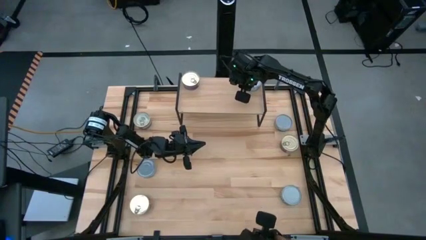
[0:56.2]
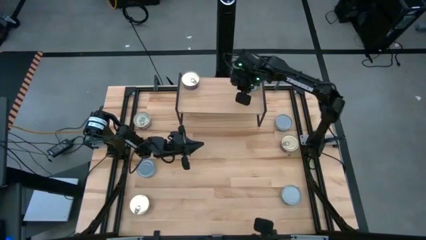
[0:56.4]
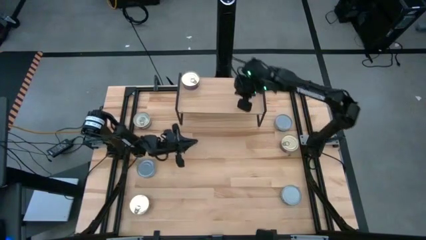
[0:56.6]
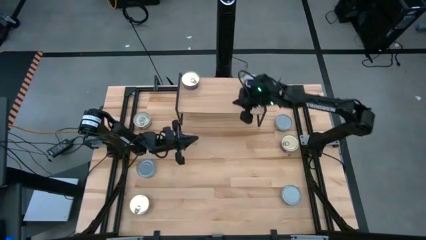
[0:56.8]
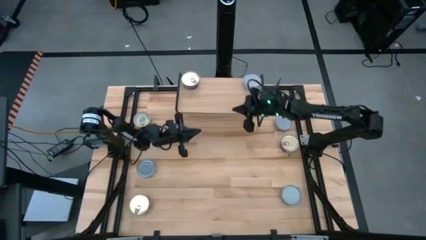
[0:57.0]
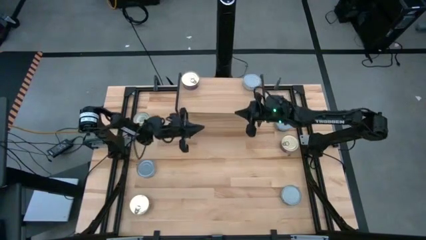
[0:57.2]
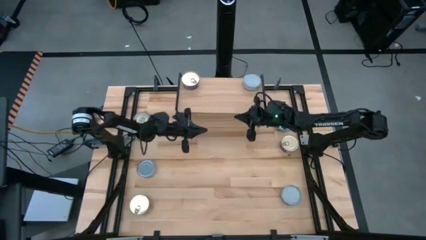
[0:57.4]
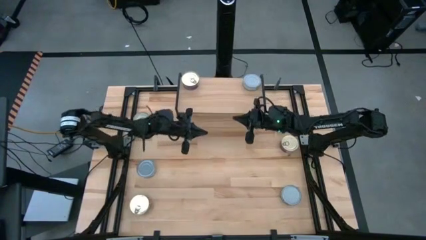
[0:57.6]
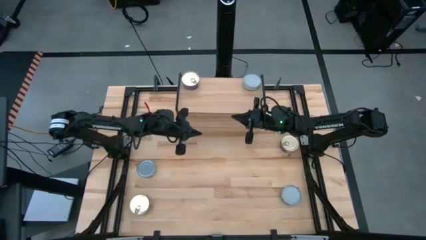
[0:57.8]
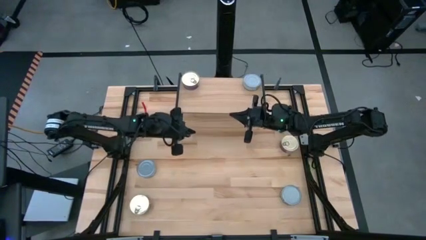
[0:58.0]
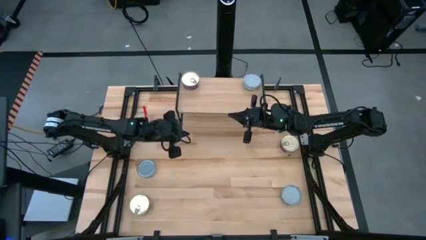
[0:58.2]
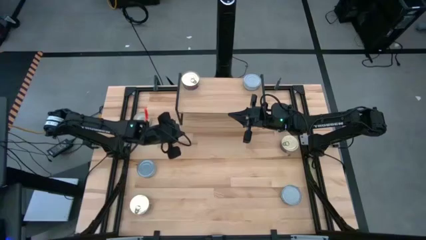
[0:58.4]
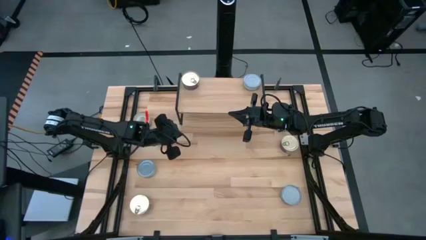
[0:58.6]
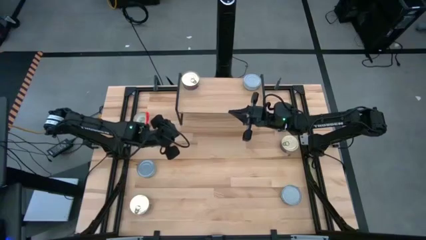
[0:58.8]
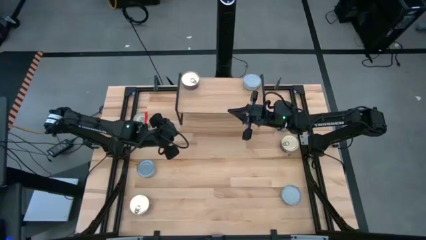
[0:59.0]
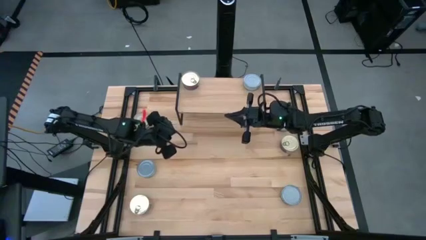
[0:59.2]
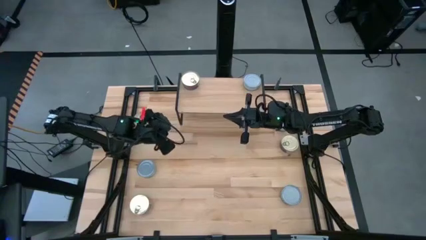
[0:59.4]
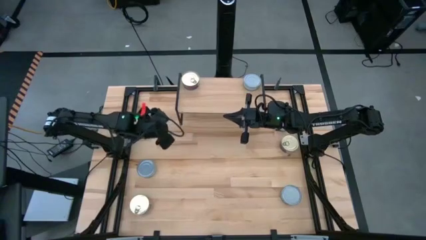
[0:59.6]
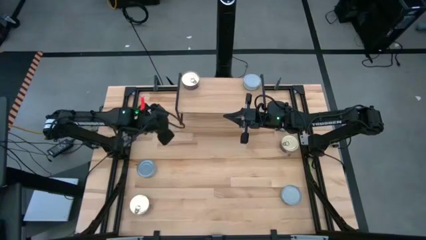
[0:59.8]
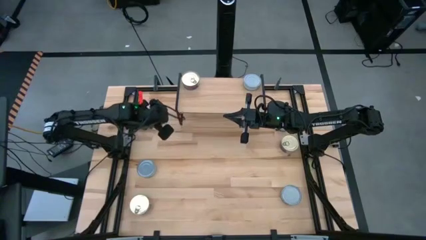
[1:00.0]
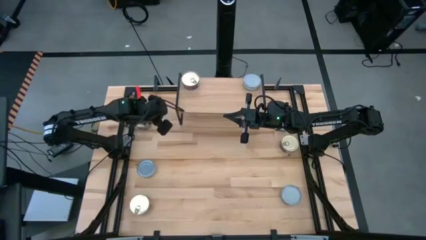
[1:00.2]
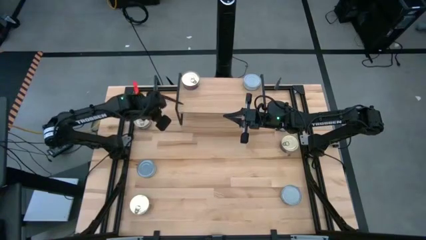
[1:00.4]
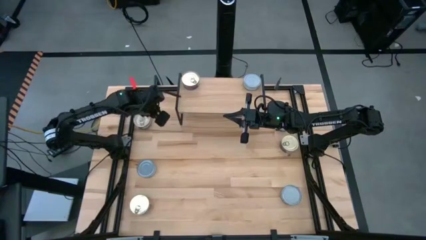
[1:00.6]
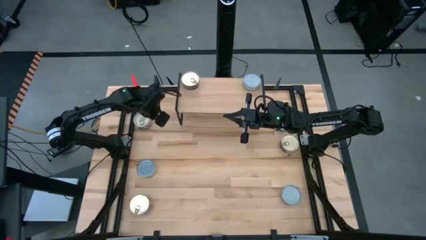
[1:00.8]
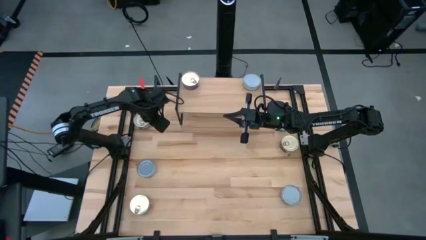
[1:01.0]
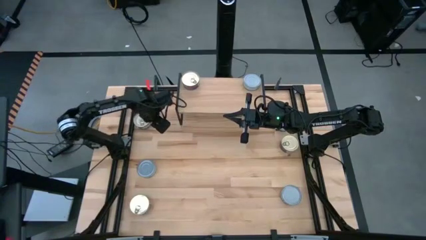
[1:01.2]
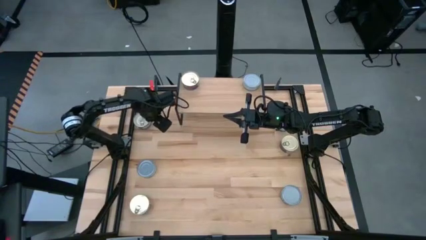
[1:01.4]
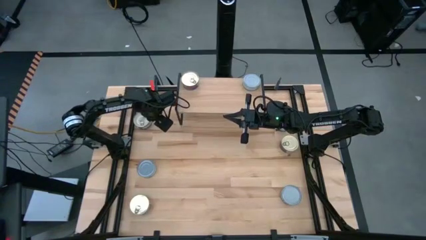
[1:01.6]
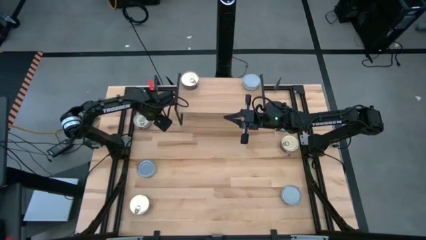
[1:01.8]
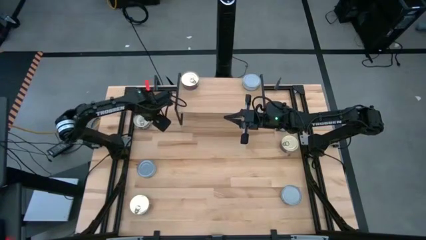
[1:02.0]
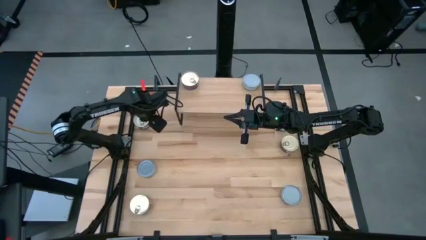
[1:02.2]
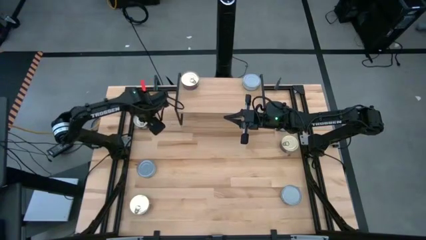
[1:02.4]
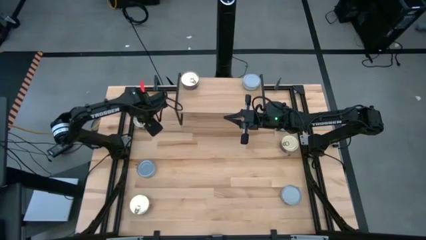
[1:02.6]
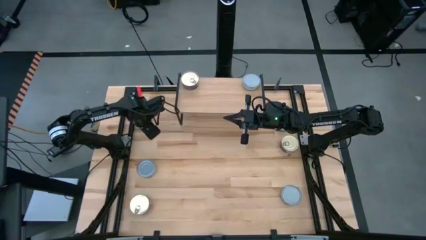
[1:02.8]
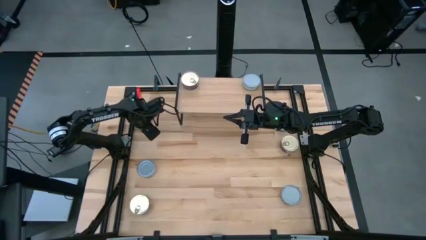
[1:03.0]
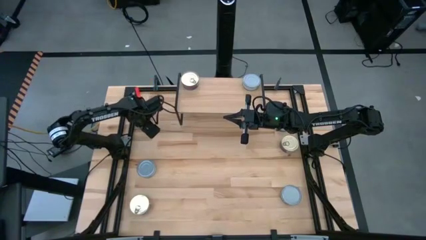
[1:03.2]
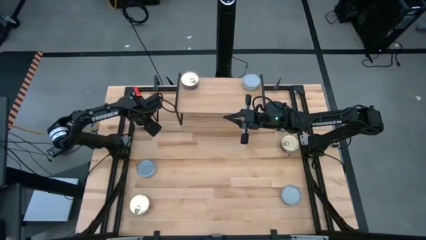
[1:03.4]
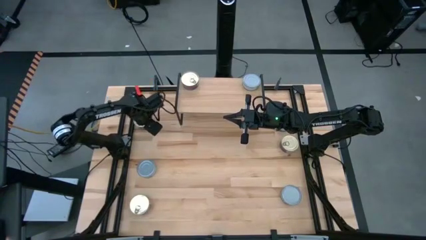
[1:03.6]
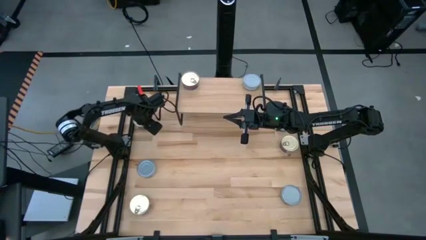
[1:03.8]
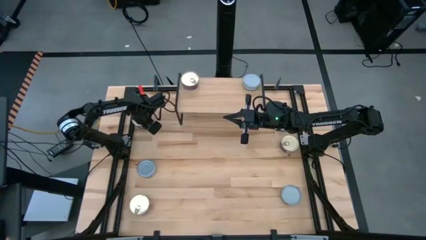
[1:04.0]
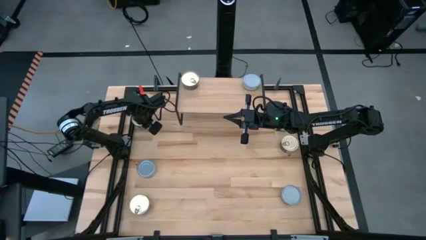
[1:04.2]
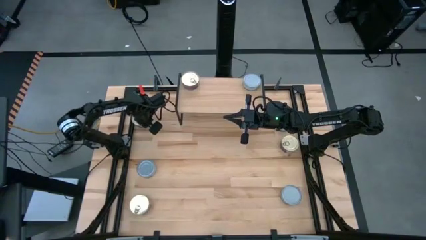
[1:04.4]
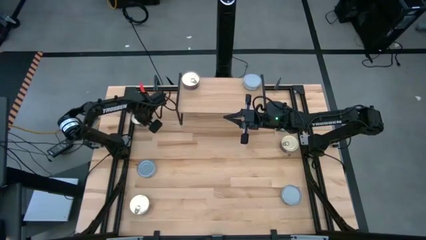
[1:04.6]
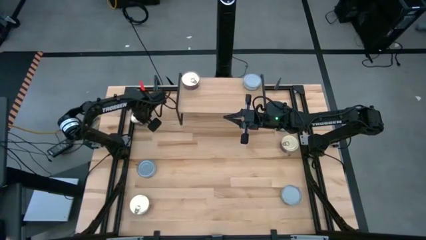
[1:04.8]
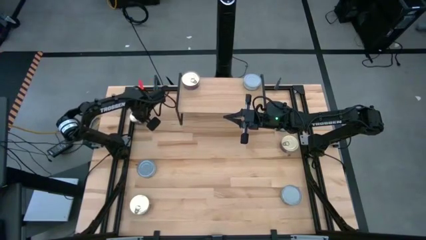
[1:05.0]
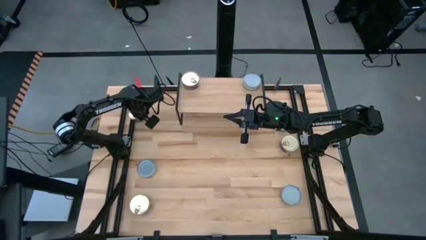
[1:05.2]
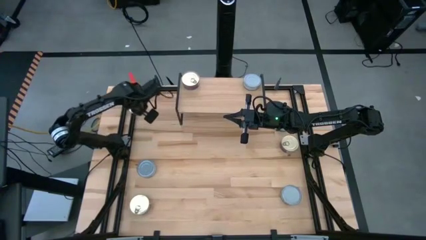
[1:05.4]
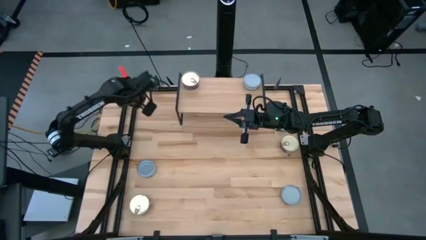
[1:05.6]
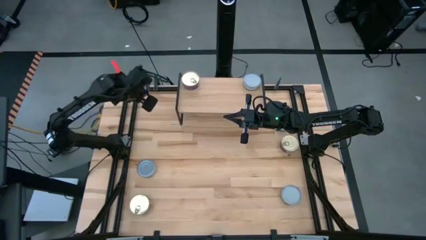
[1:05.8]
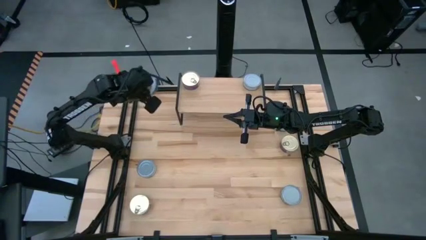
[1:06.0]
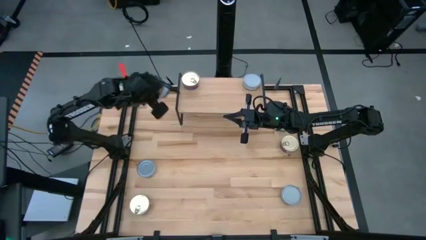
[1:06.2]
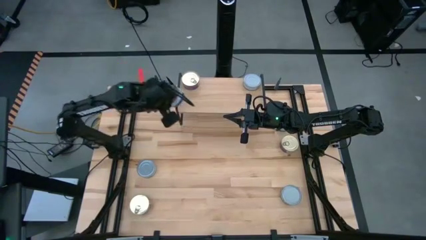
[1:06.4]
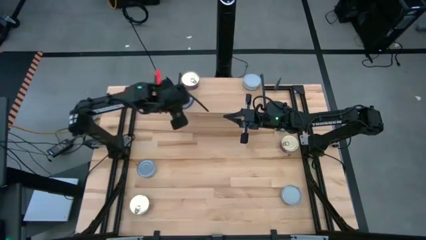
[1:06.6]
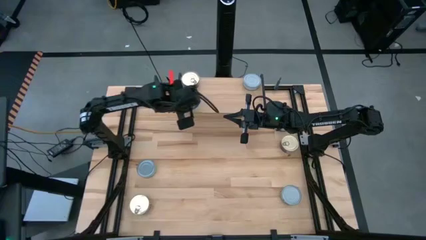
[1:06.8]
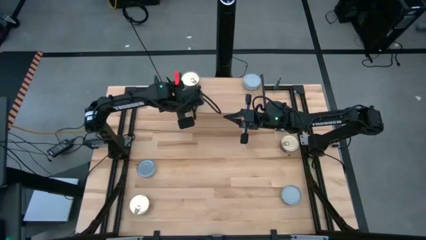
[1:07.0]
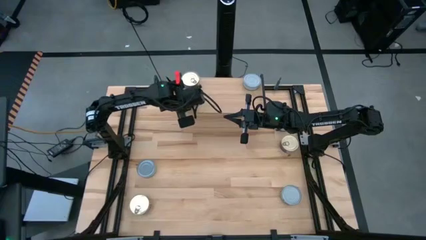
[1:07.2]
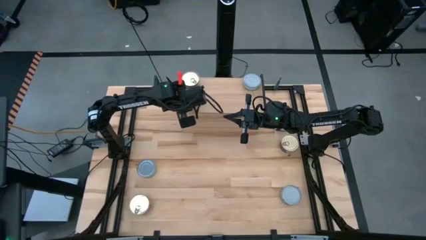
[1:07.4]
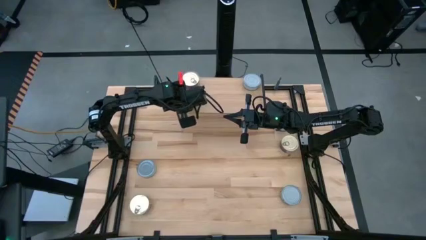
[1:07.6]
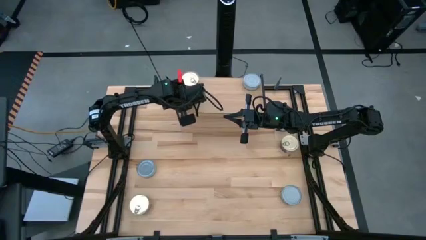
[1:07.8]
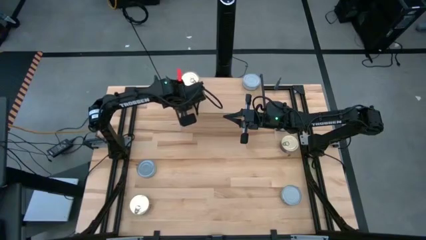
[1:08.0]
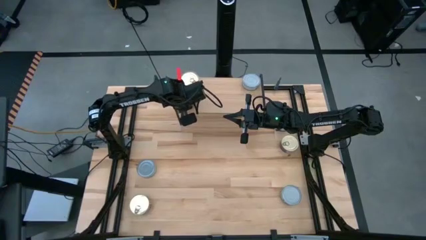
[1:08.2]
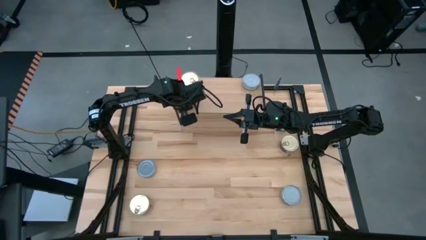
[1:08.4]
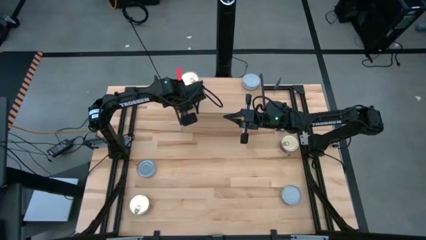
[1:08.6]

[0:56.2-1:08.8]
Task: Stack canned seafood by type on shelf
Put the top left blue tuna can on the shelf aligned with the other blue tuna can

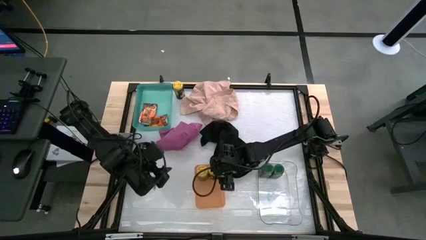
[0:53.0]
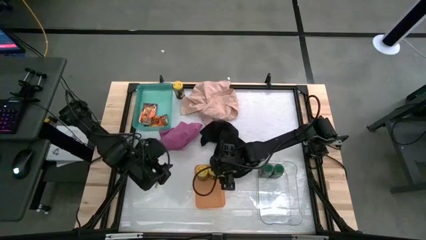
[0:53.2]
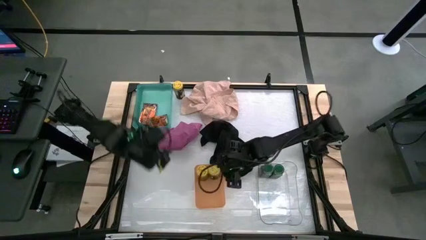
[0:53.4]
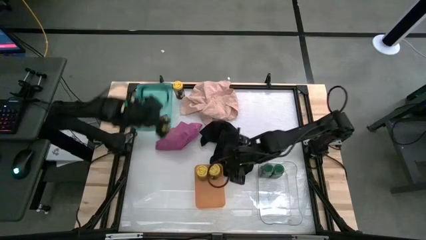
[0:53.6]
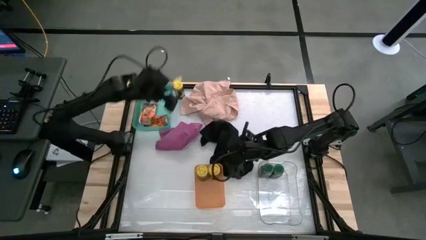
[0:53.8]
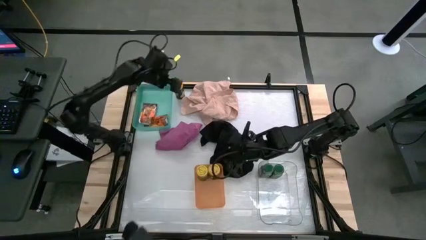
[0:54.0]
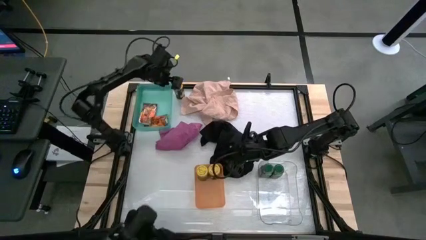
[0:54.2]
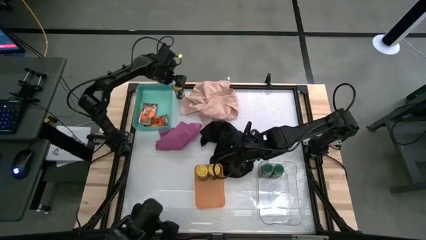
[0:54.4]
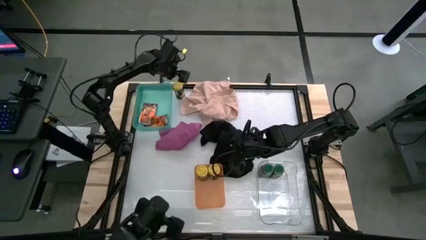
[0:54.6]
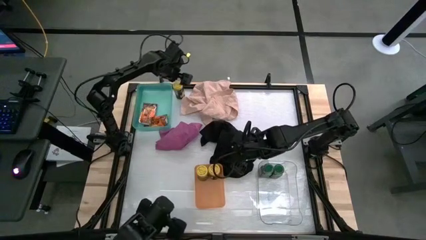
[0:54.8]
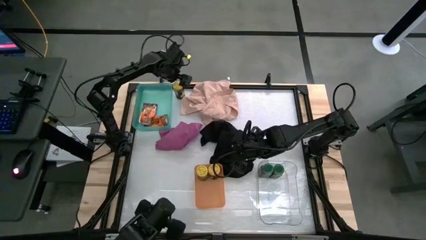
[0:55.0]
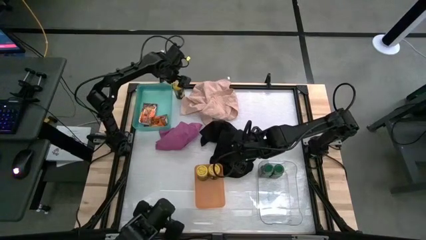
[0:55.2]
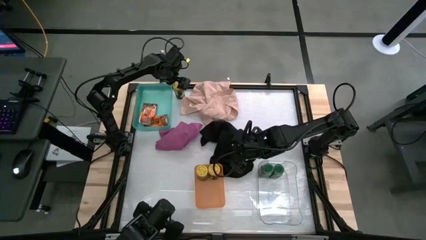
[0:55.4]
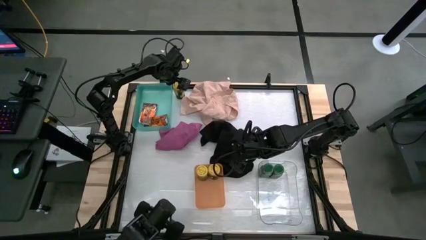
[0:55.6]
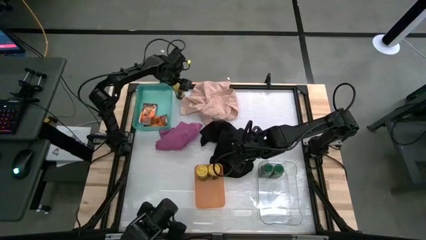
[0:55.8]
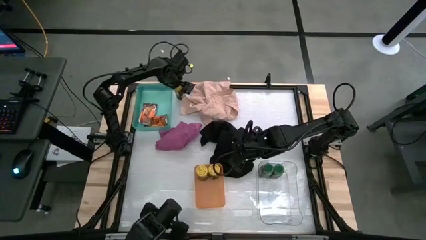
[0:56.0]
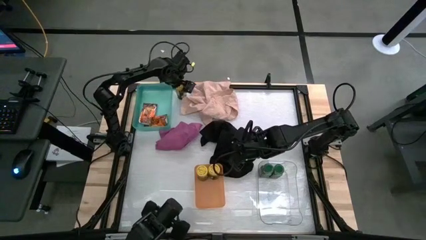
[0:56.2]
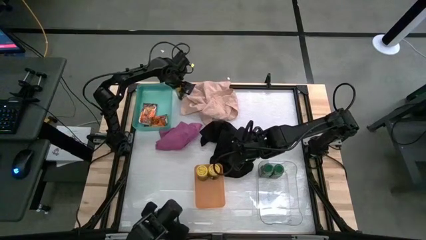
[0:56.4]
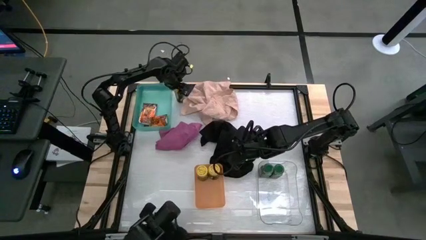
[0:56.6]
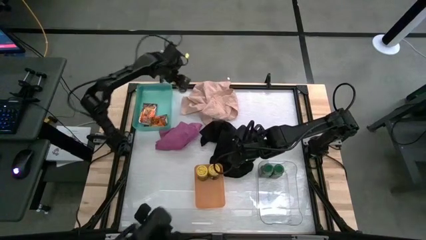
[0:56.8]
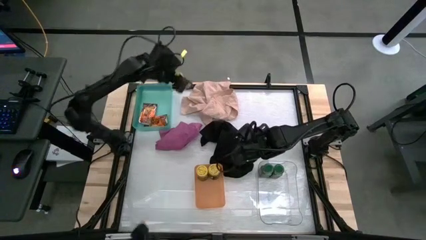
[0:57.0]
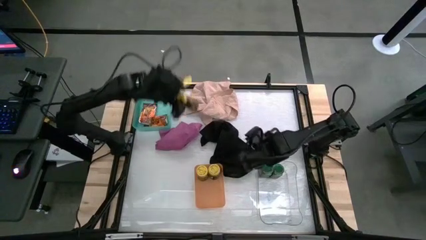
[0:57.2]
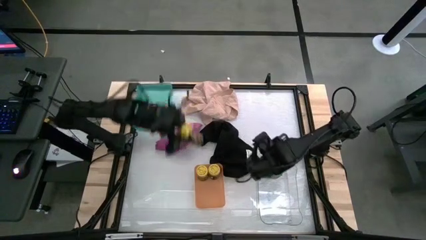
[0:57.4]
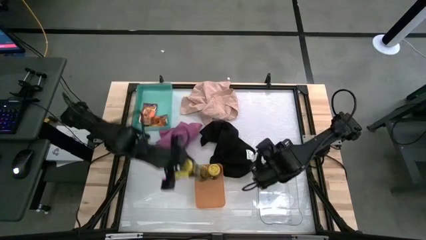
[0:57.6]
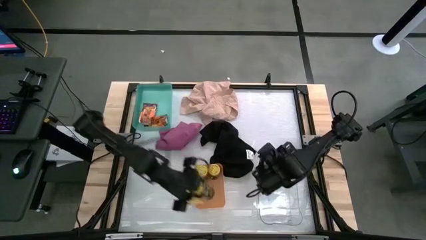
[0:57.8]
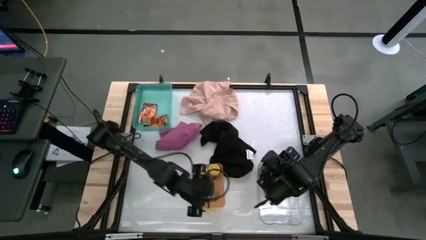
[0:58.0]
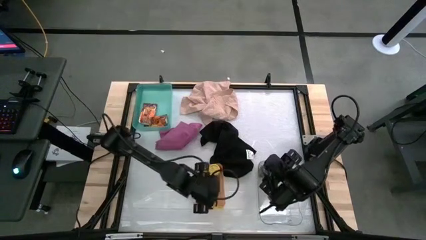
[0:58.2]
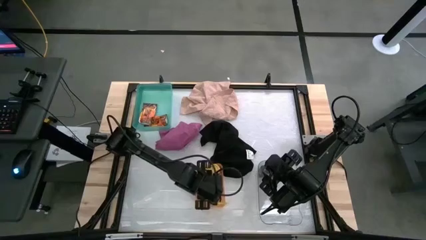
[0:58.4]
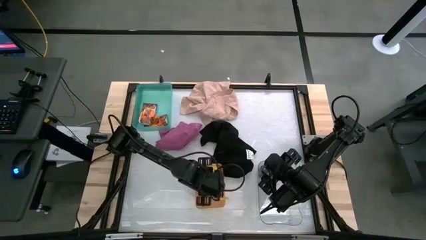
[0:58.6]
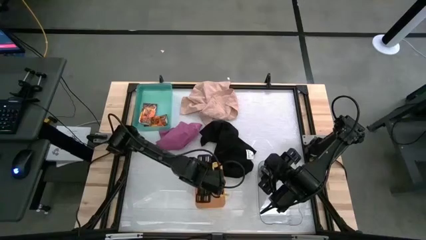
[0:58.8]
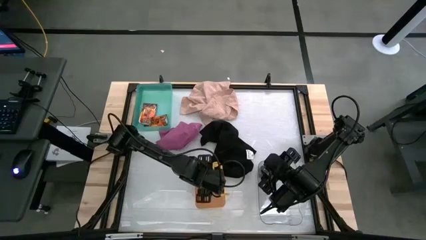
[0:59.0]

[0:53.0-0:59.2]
Task: Sort spices by type
Put the yellow seasoning bottle into the orange bin
